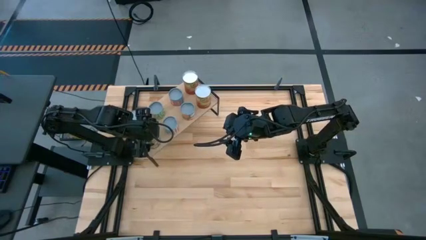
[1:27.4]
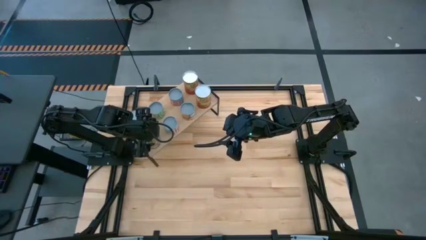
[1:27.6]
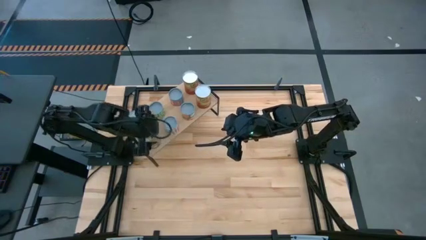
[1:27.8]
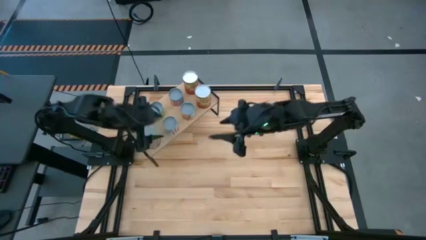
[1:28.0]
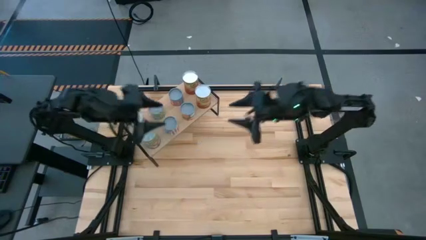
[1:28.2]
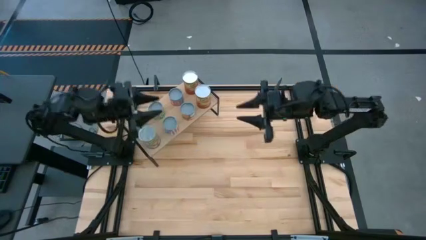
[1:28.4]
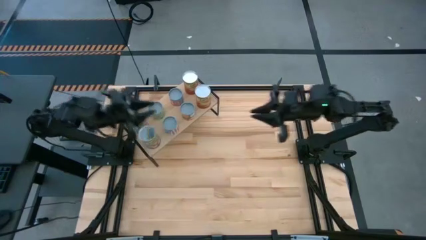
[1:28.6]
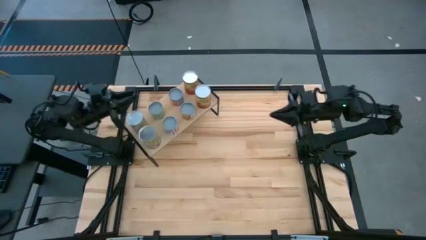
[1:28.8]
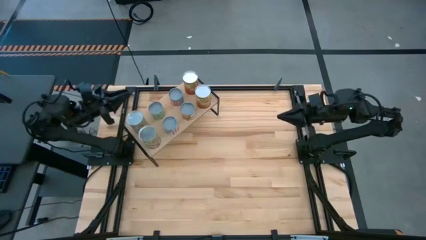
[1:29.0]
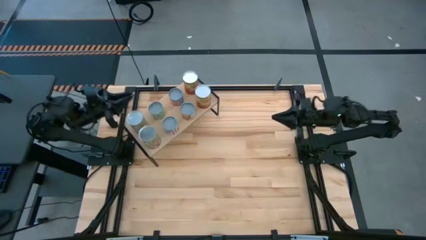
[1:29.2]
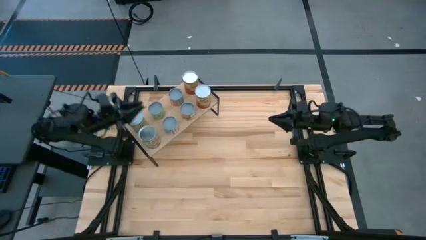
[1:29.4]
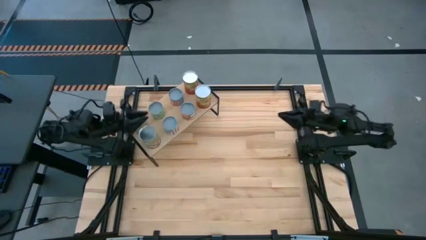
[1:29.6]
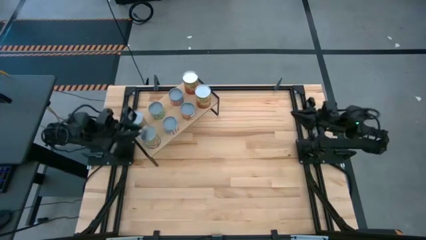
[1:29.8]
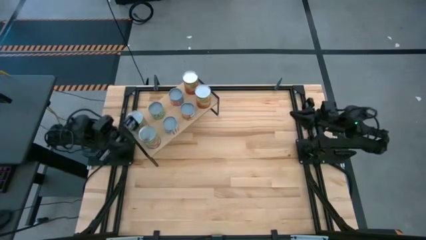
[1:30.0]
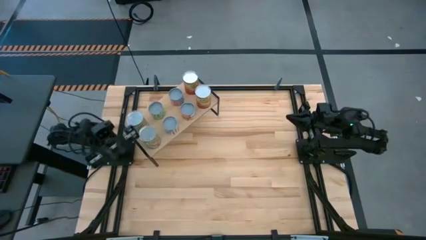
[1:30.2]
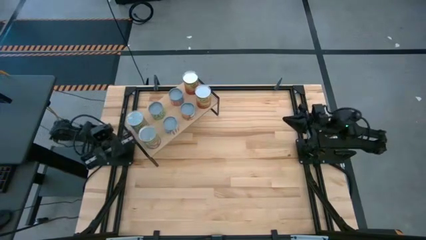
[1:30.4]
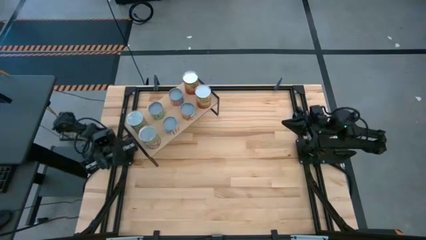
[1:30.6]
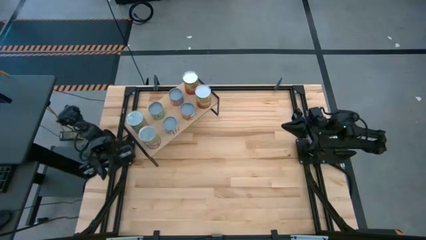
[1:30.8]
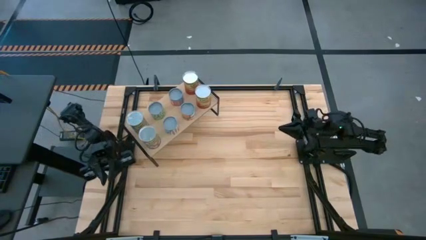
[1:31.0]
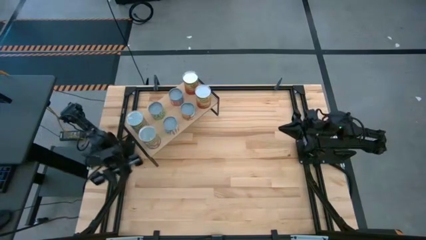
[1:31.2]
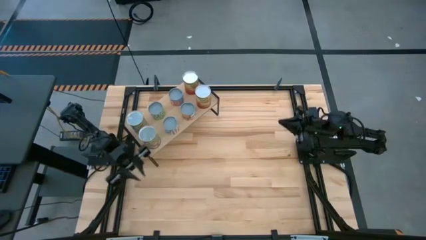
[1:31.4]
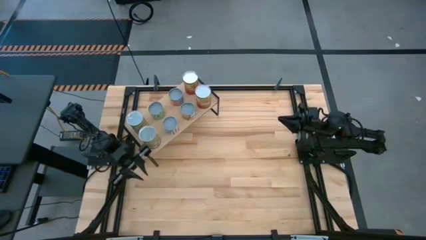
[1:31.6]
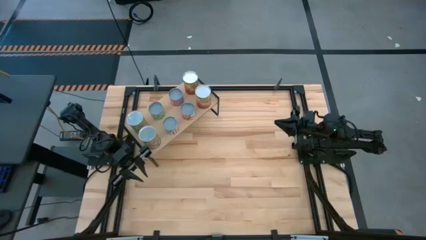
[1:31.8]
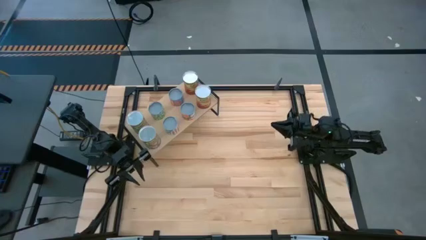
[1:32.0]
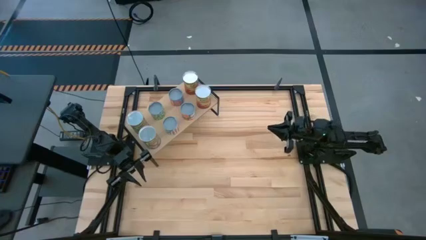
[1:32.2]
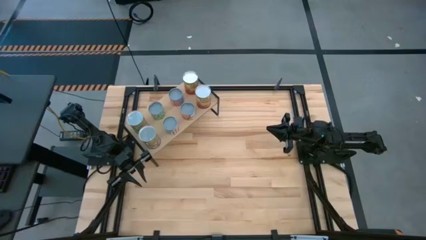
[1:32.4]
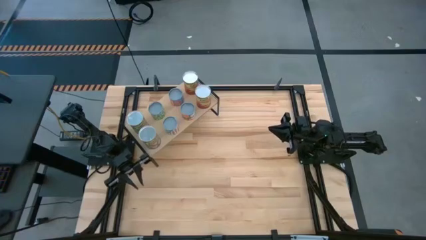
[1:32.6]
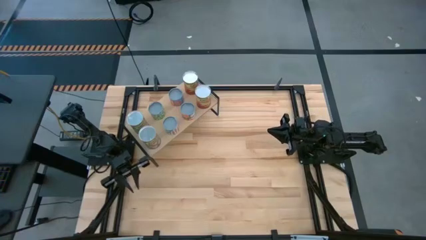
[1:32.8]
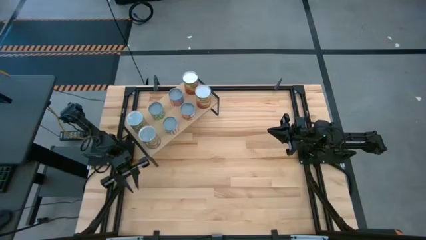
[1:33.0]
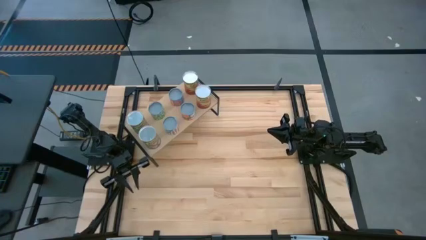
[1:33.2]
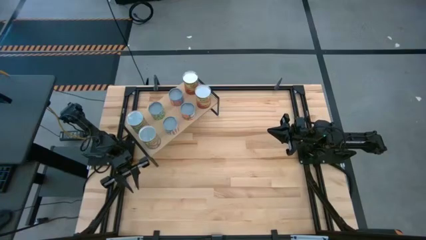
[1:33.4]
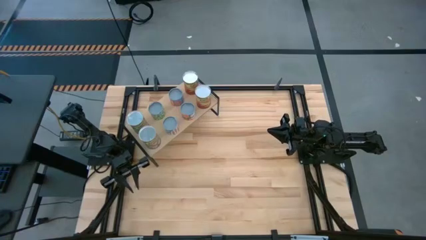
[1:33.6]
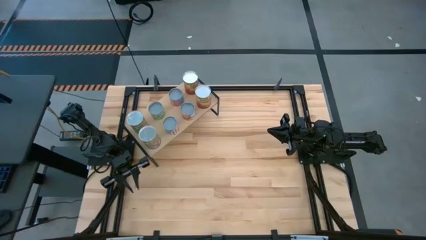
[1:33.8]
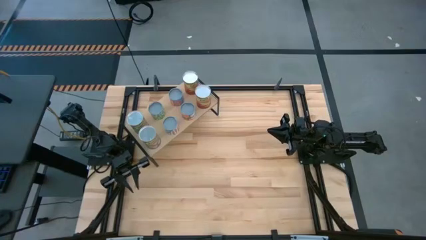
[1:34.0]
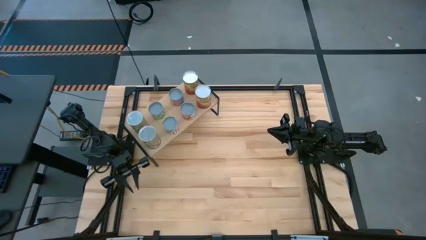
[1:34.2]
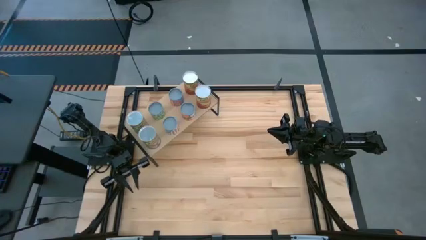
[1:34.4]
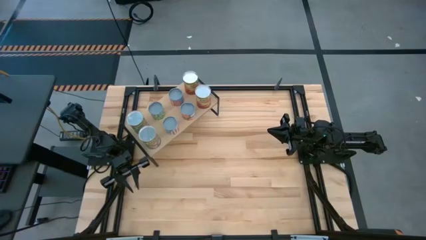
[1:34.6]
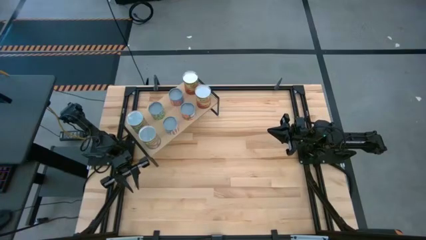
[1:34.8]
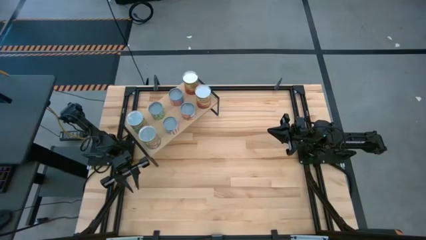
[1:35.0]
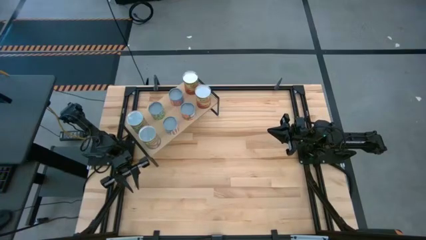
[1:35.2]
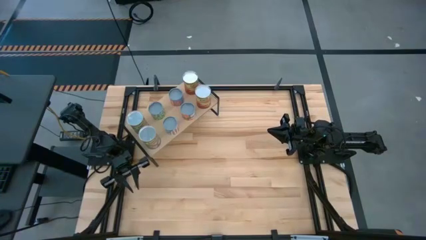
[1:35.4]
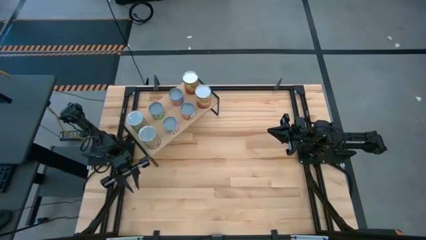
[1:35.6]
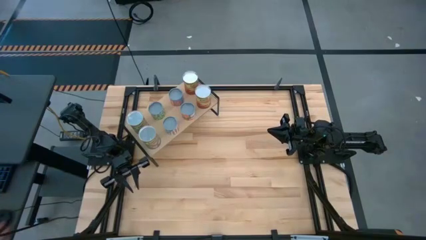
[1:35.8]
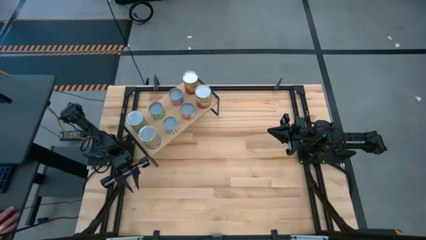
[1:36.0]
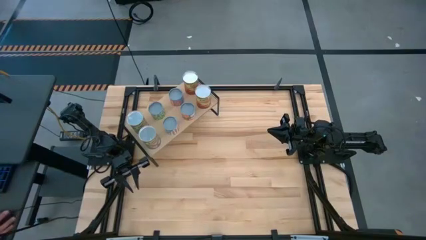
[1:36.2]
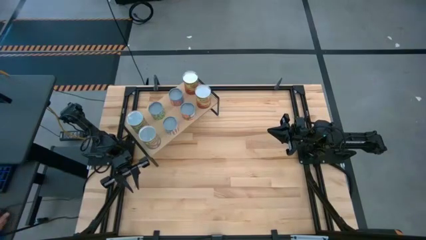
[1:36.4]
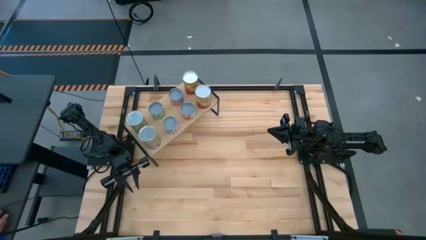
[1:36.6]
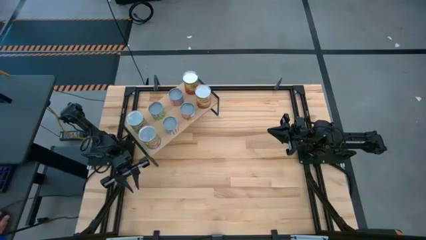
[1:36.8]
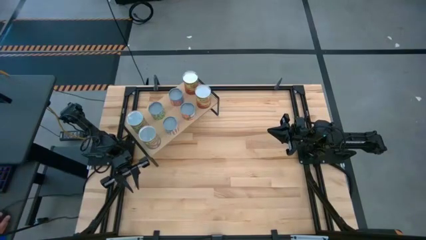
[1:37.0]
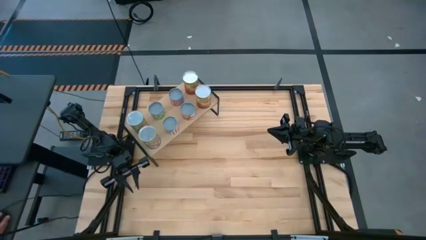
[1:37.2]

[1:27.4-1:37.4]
Task: Pick and place cans onto a shelf
Return to Home Position
